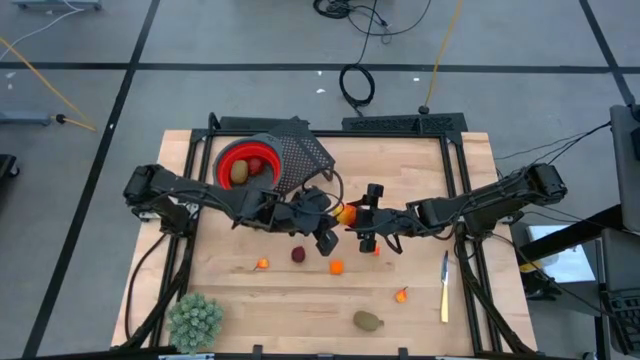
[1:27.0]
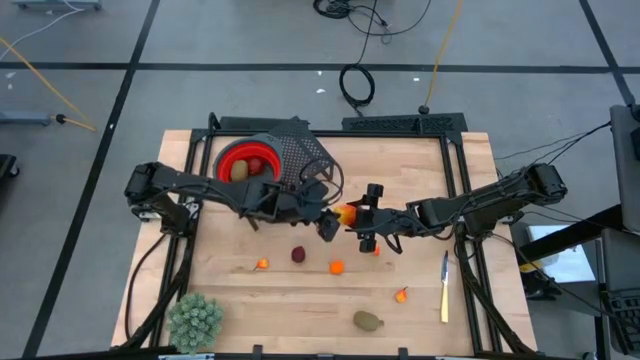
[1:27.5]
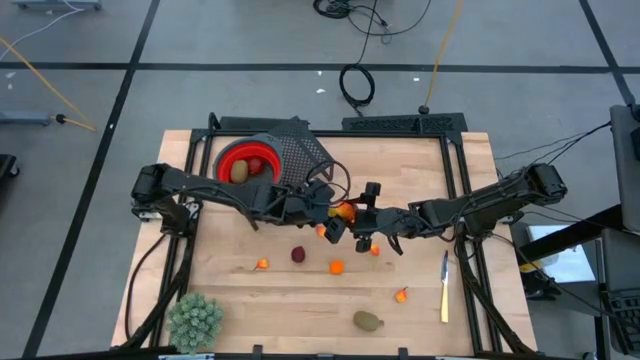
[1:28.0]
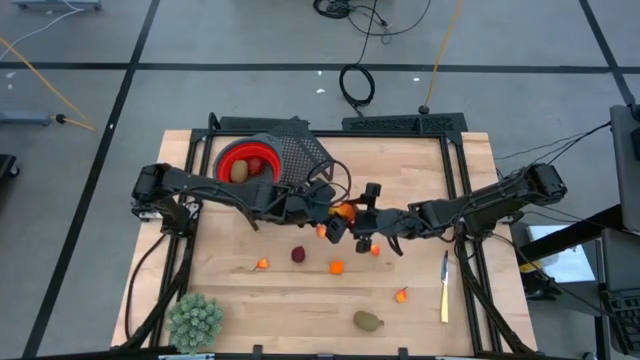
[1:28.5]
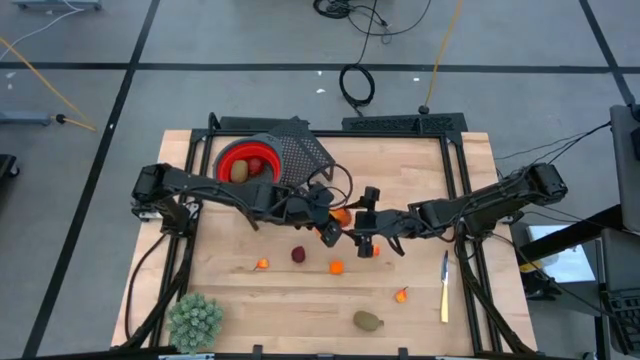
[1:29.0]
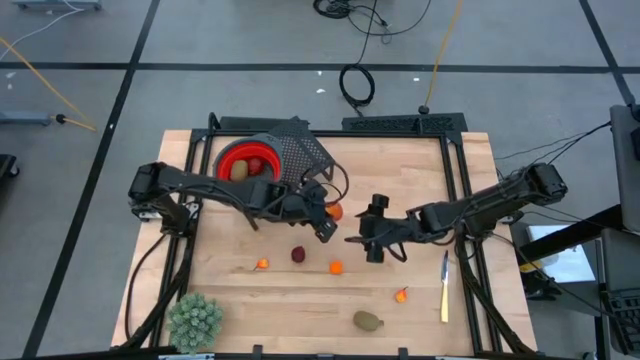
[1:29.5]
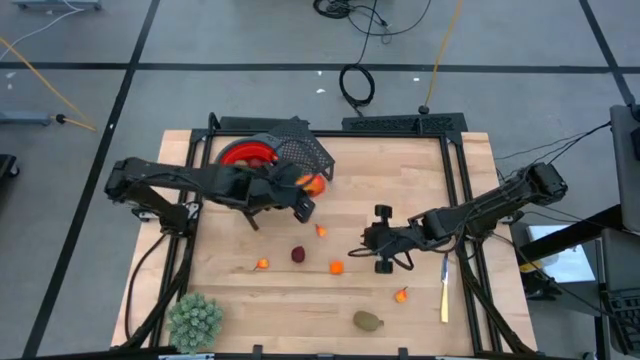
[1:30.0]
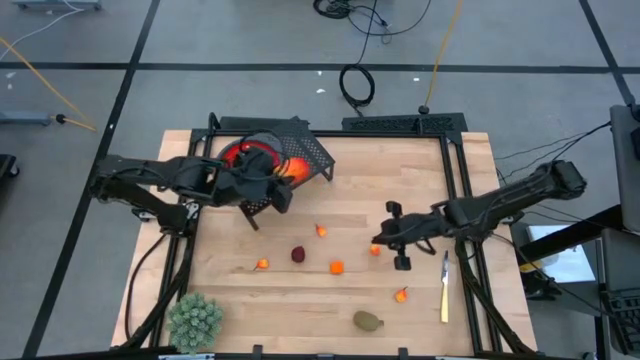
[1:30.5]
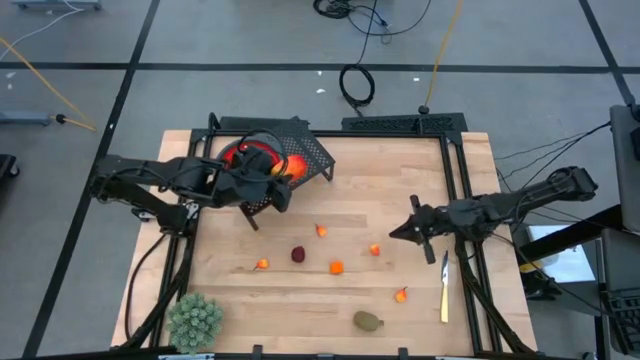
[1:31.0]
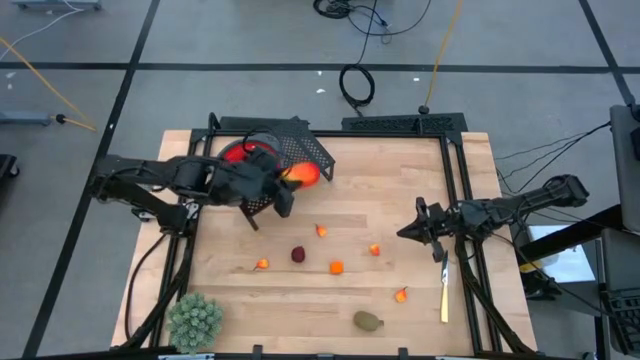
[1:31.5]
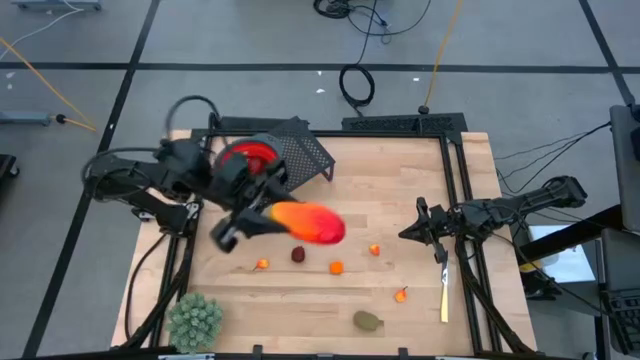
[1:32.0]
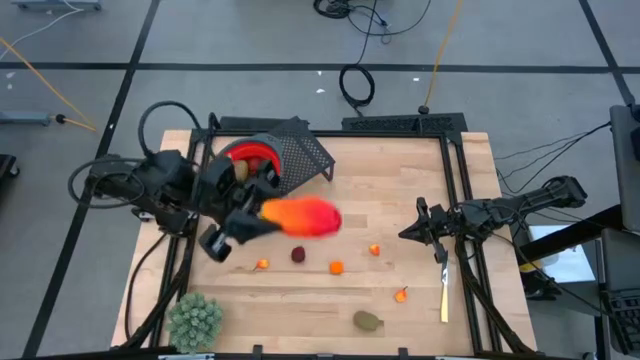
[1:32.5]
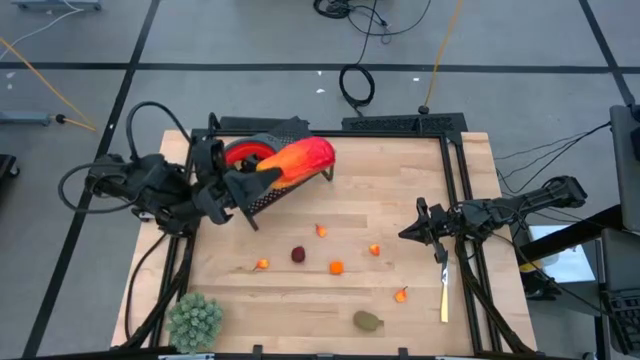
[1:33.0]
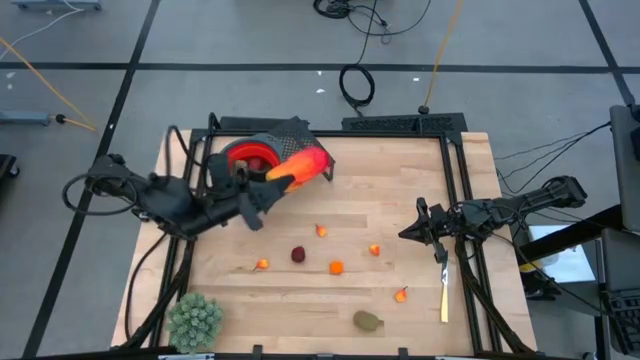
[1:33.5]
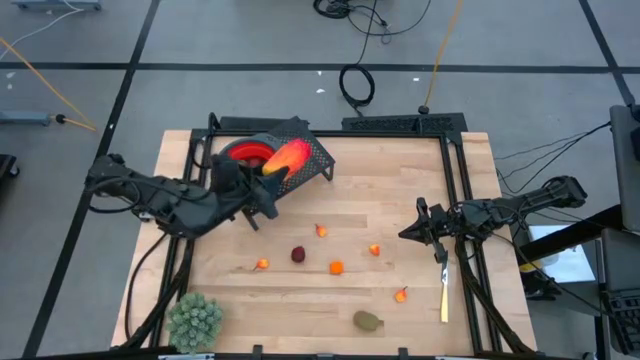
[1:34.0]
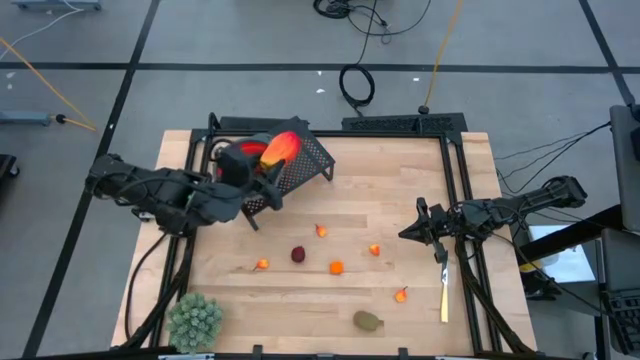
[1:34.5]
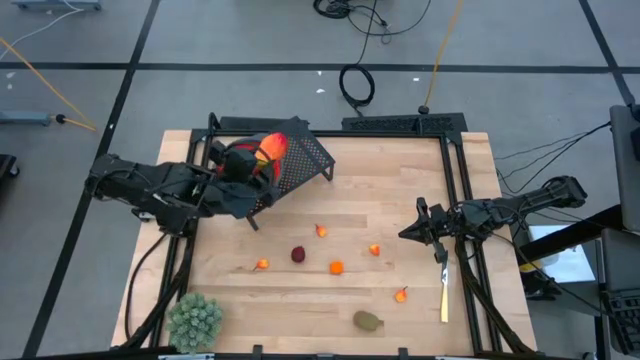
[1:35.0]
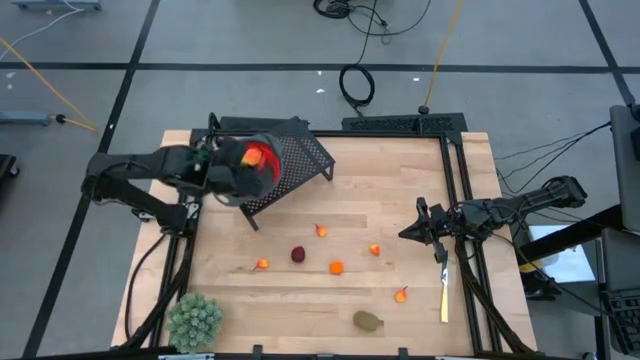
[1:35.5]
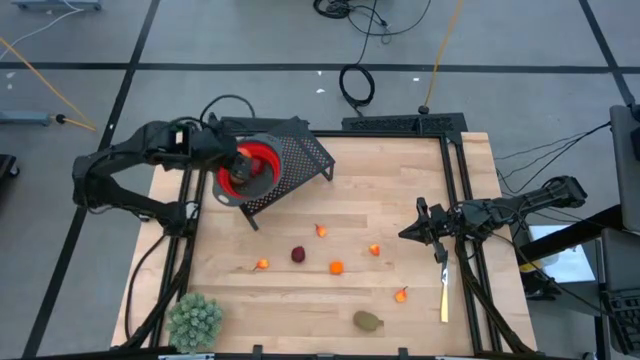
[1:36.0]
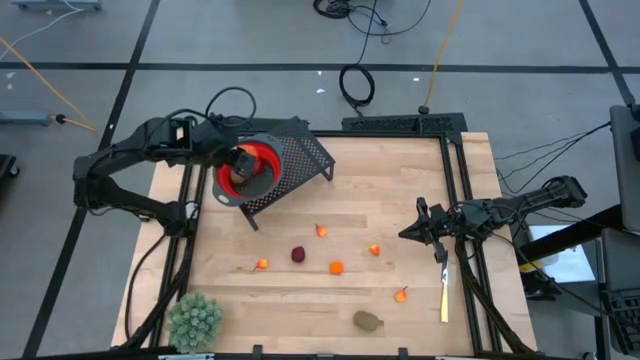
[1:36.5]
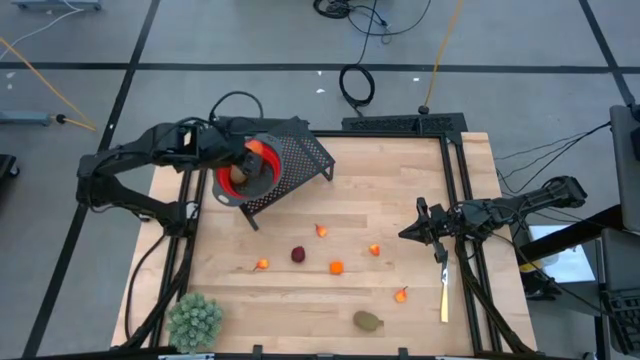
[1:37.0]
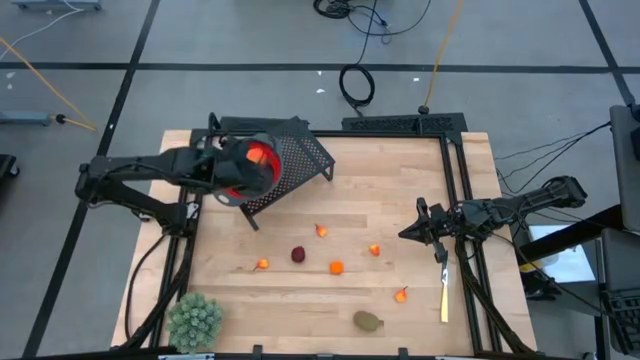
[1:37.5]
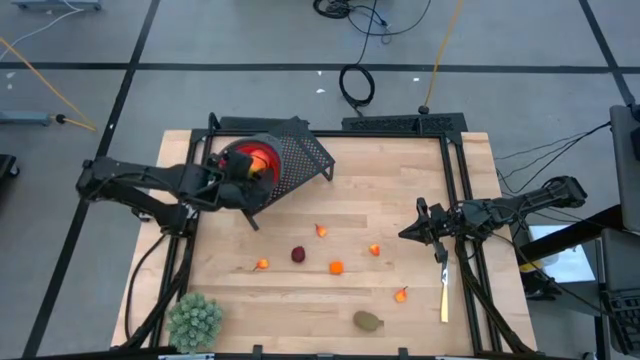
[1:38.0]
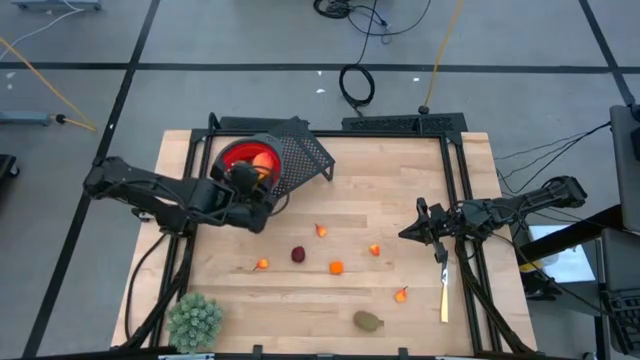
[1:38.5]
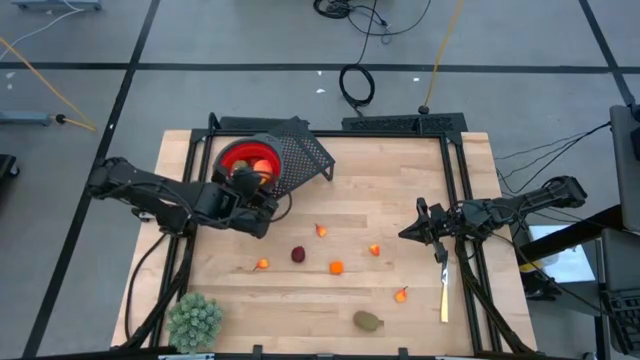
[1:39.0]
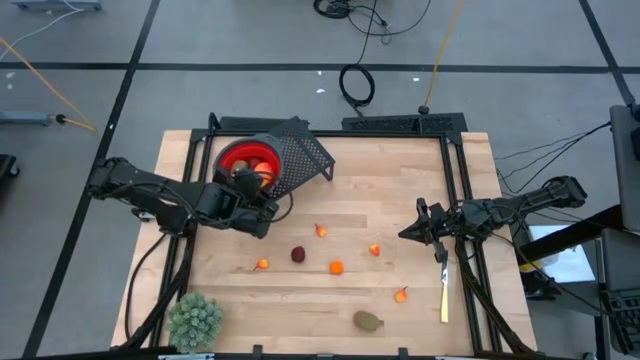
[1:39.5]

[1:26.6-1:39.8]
Task: Pick & Place Fruit
Put the mango into the red strainer bowl on the shelf

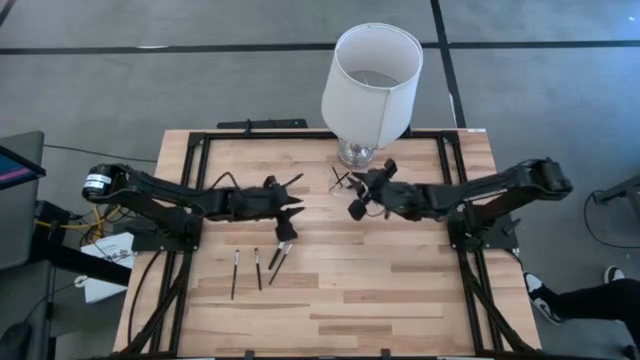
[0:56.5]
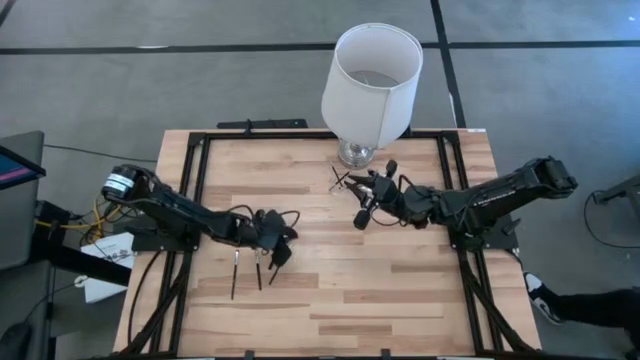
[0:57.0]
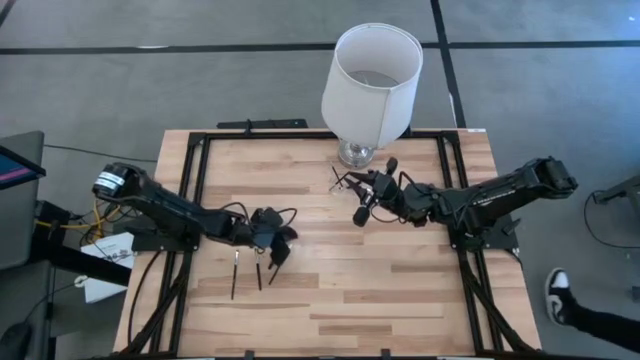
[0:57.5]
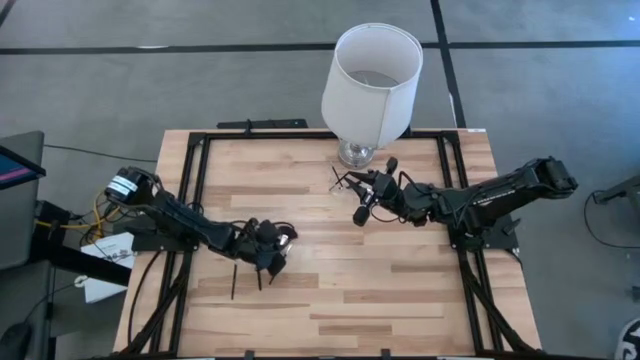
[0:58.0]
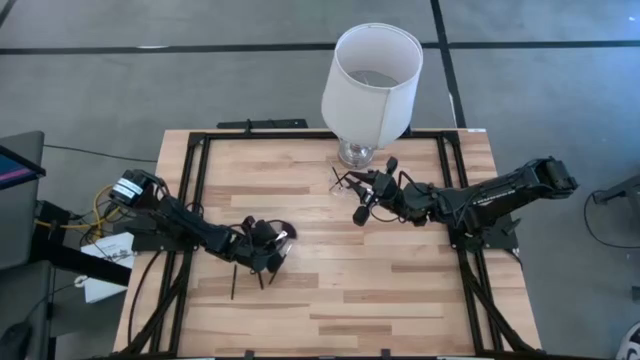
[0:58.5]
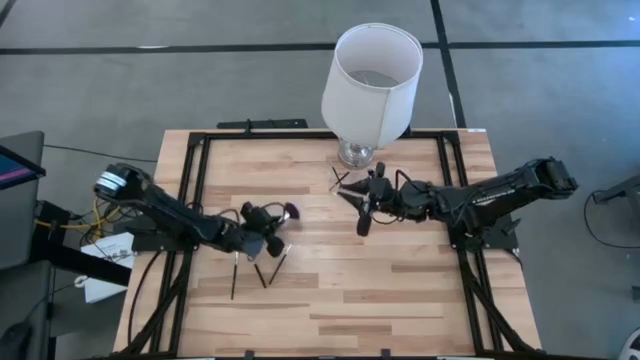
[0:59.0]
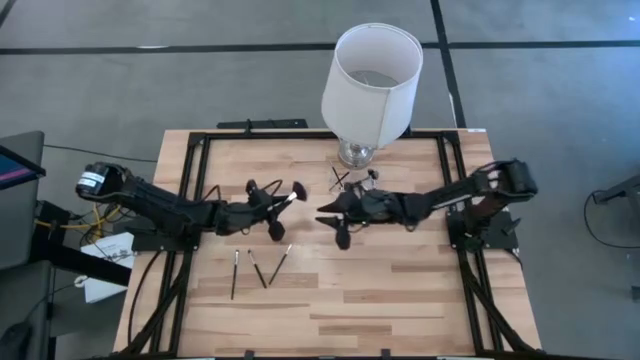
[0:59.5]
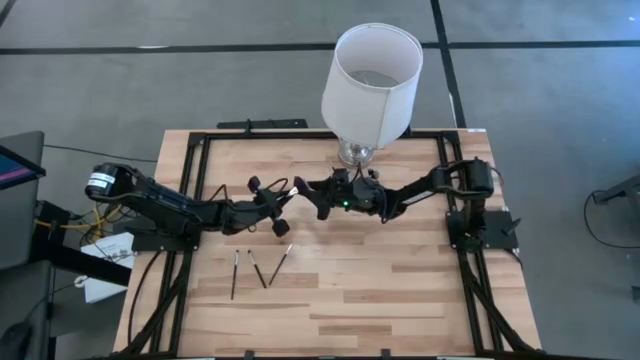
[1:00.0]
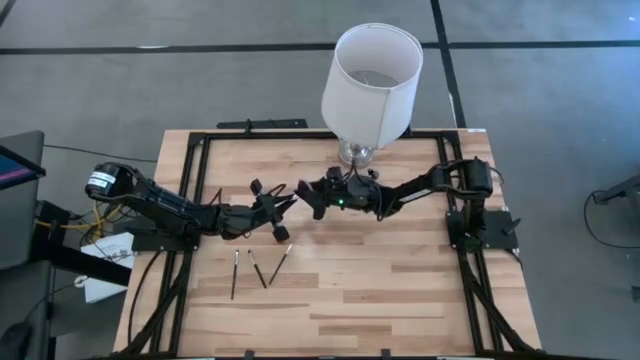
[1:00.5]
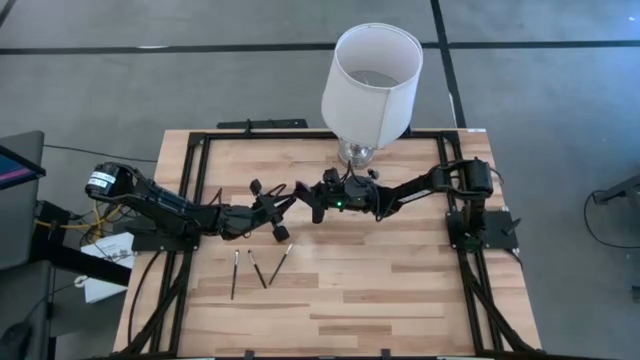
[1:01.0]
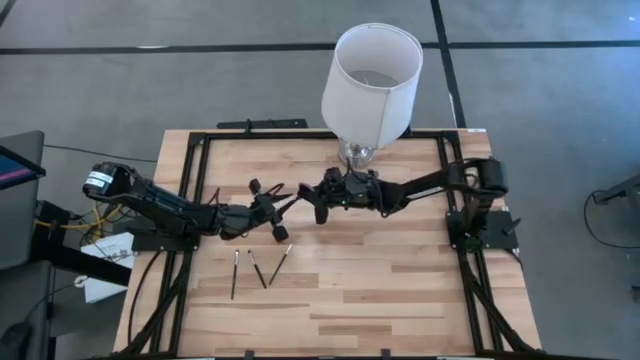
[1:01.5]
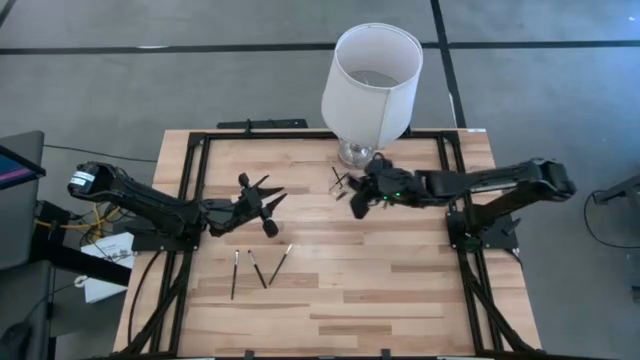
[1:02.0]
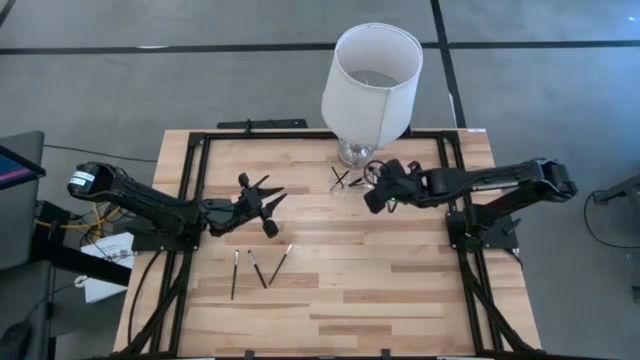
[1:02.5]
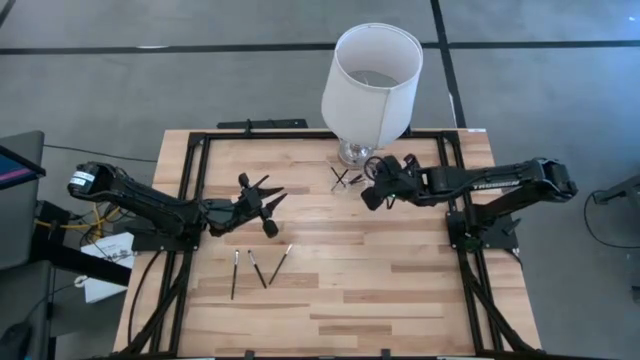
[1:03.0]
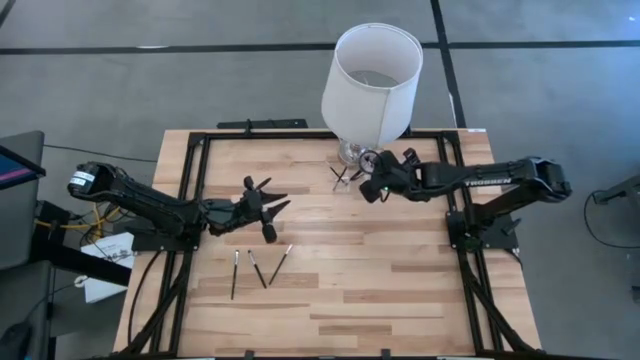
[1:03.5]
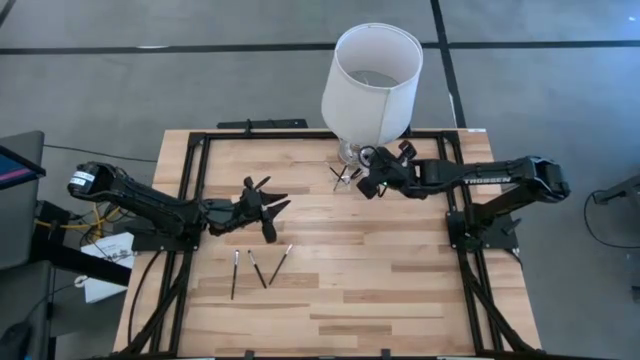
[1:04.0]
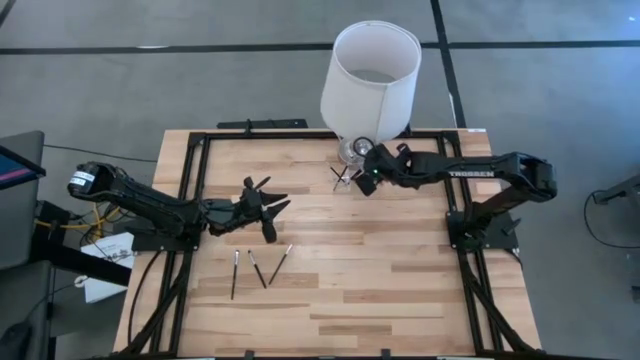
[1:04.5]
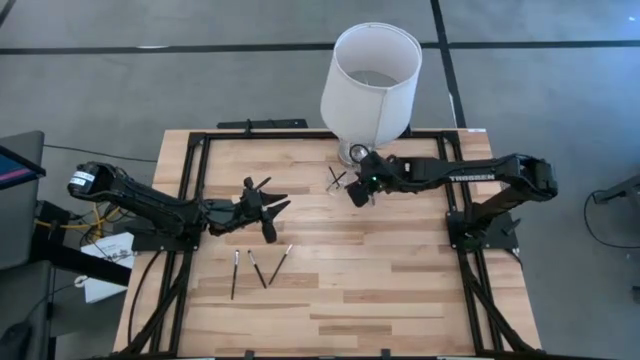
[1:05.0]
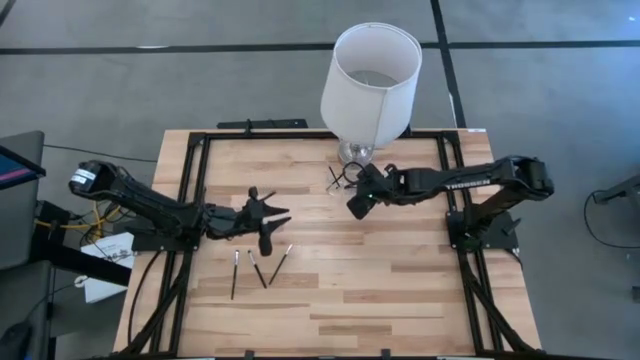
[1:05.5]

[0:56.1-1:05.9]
Task: Put items in baskets/containers
Put the highlighter brush into the transparent organizer
